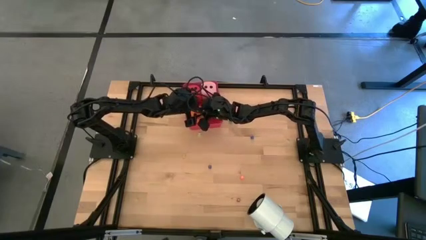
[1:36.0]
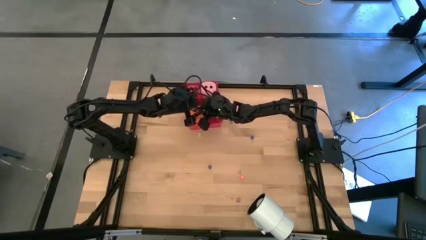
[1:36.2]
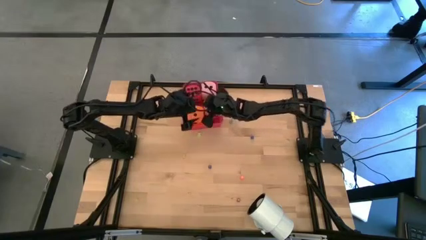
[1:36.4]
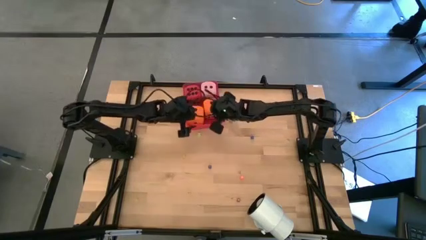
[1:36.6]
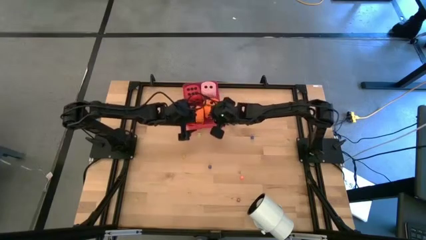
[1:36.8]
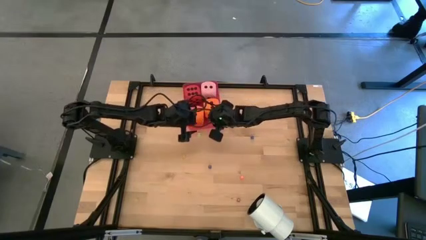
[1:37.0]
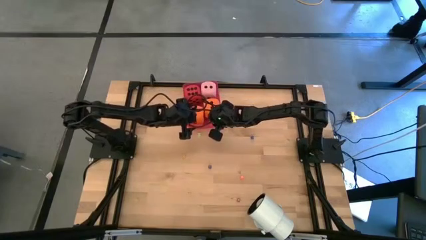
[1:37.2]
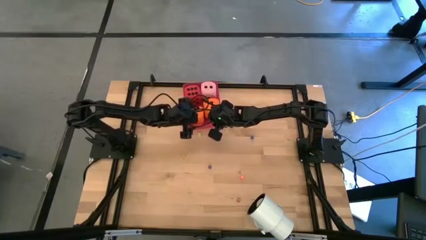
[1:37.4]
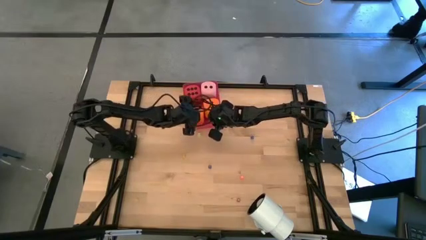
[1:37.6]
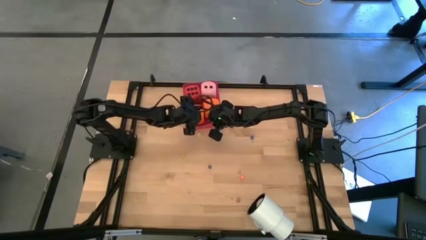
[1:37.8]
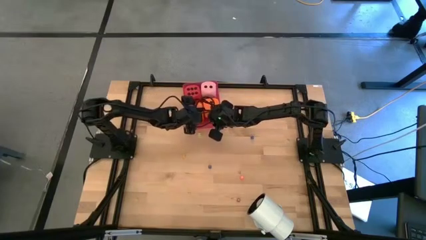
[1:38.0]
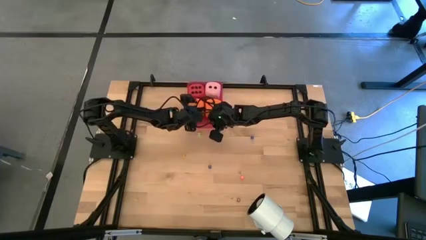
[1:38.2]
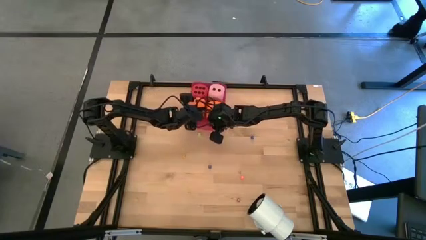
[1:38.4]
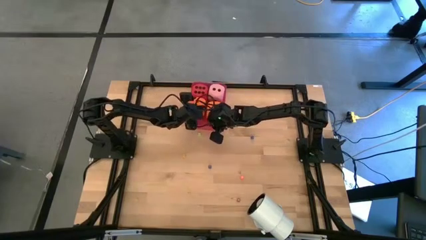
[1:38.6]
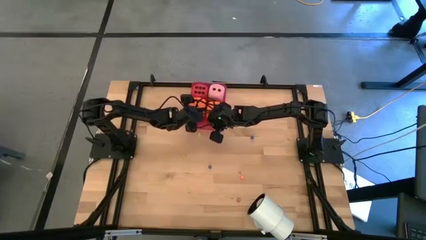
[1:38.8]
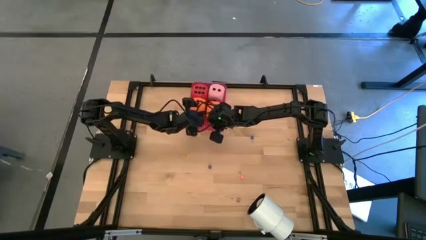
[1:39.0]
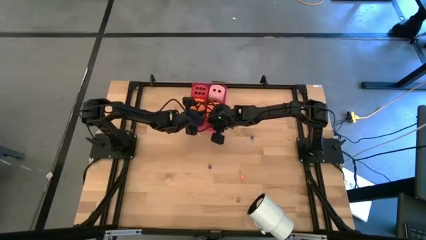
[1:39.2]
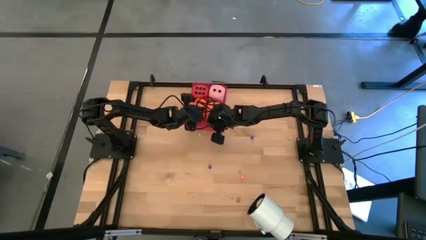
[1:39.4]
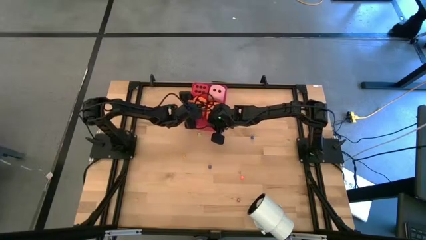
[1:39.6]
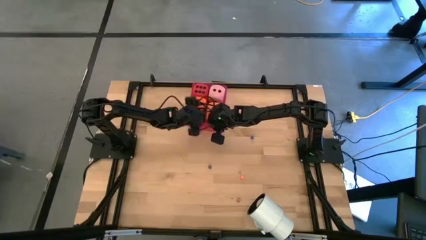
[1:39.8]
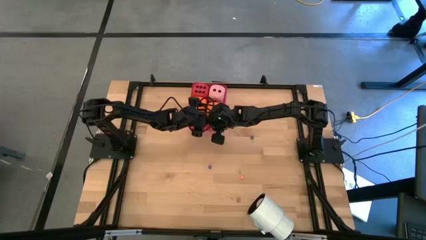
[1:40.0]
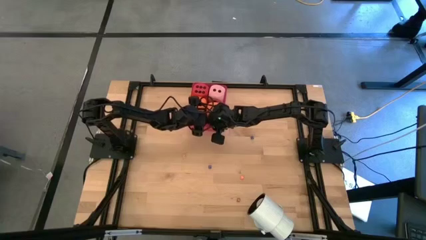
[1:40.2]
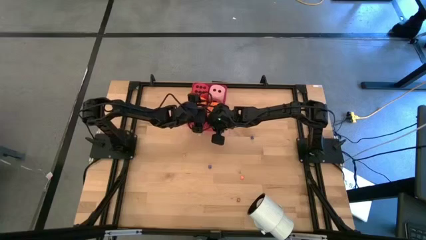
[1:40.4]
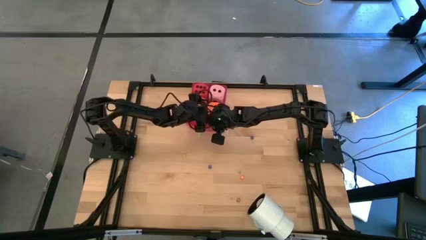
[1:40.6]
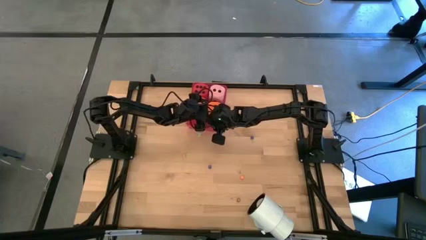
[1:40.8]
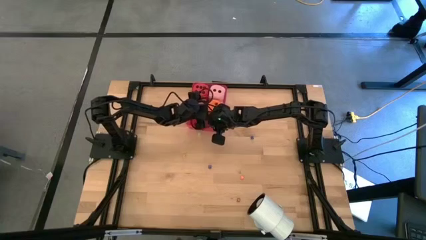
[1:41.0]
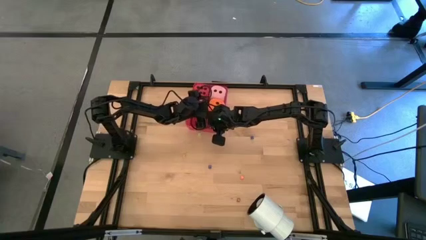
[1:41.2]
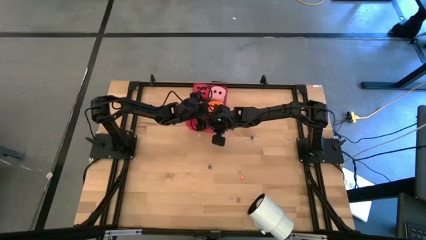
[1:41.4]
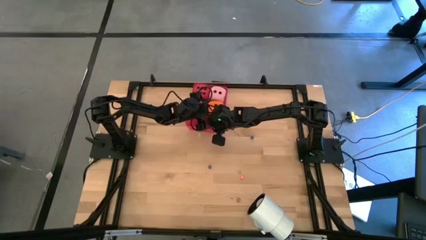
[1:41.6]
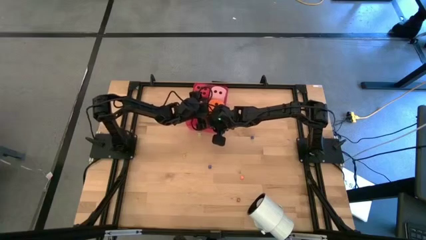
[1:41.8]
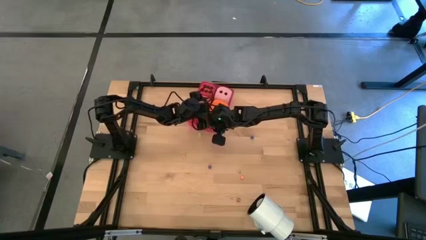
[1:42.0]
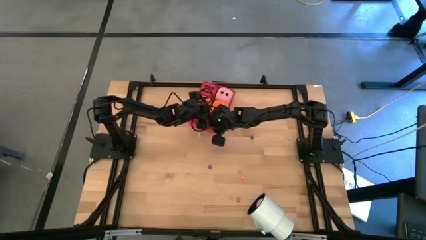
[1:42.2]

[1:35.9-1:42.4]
Task: Pick & Place Dice
Adjust the big orange dice in the red bin

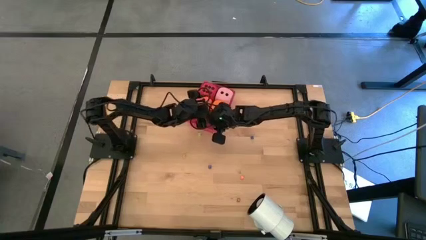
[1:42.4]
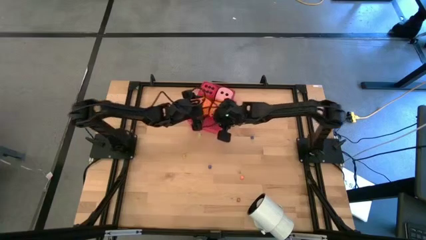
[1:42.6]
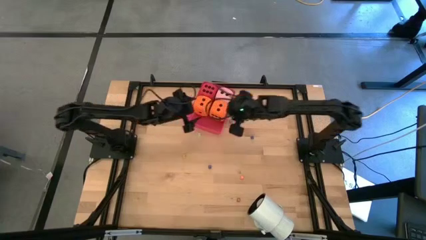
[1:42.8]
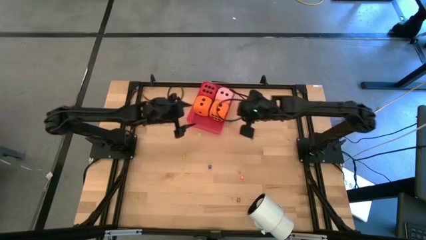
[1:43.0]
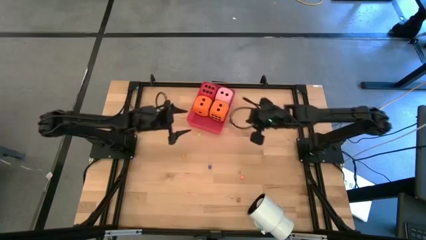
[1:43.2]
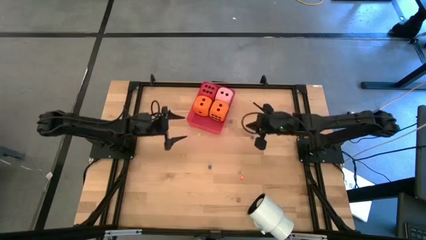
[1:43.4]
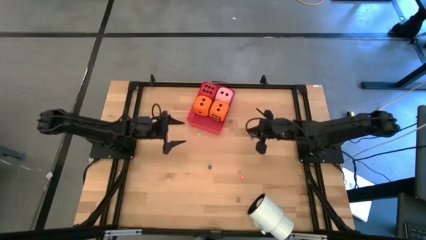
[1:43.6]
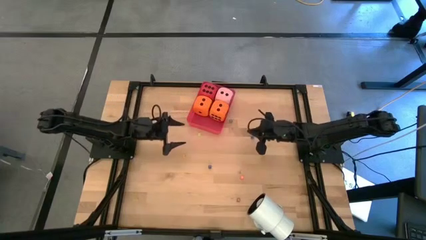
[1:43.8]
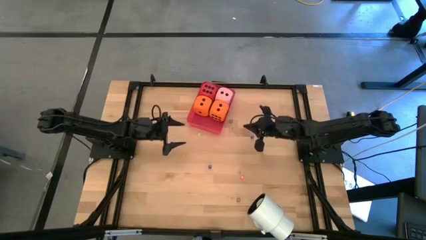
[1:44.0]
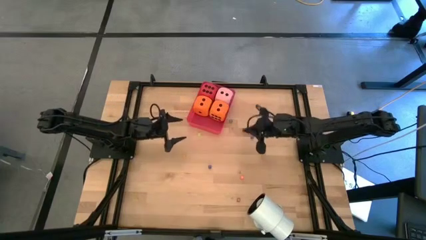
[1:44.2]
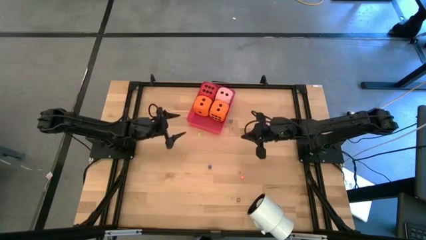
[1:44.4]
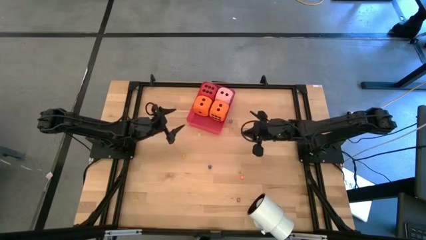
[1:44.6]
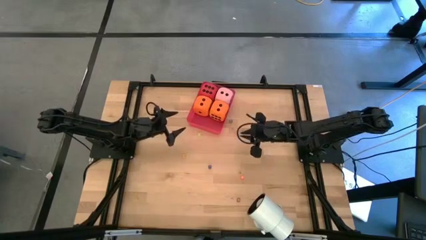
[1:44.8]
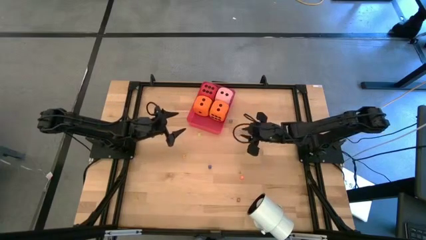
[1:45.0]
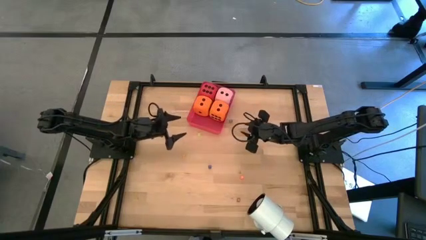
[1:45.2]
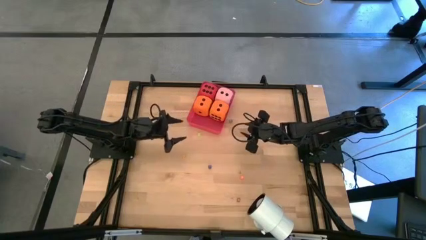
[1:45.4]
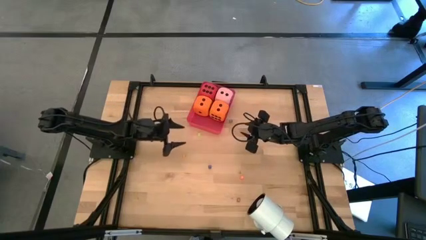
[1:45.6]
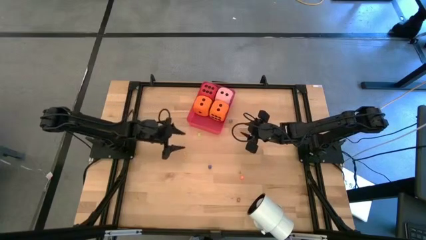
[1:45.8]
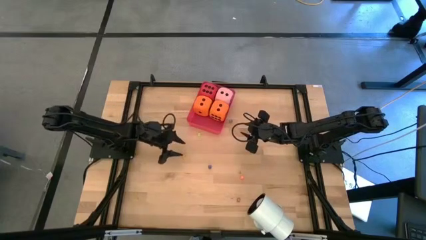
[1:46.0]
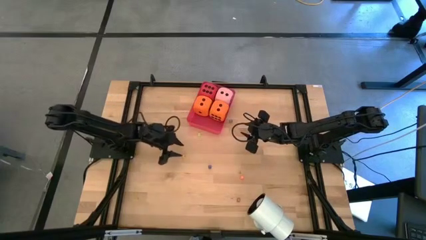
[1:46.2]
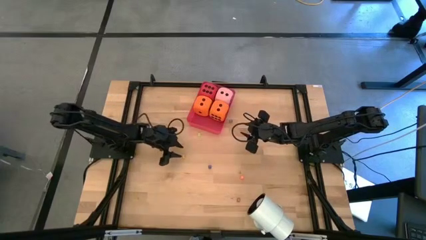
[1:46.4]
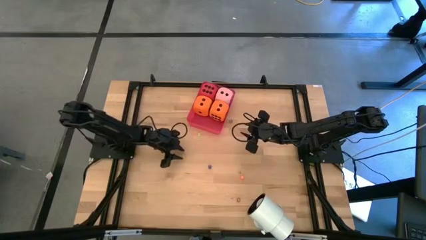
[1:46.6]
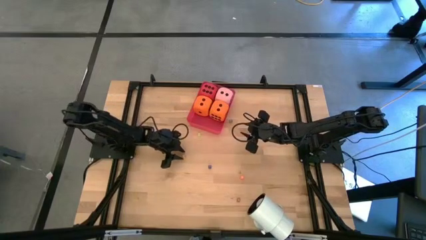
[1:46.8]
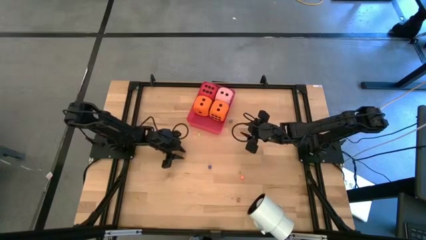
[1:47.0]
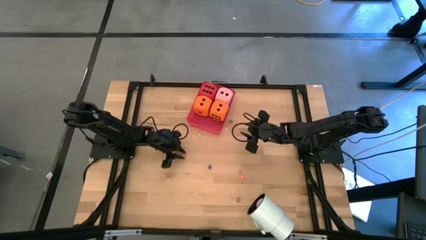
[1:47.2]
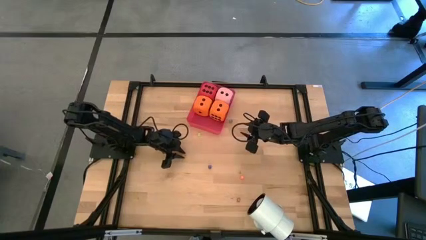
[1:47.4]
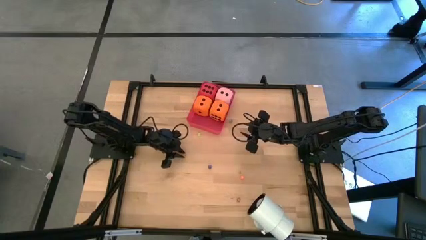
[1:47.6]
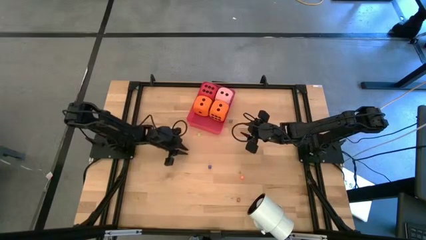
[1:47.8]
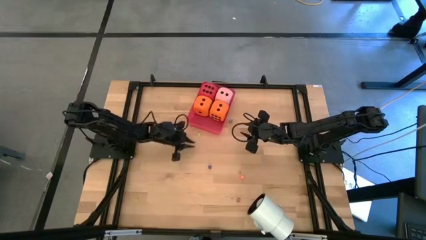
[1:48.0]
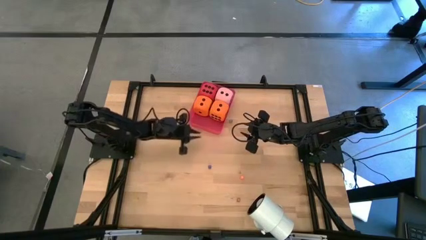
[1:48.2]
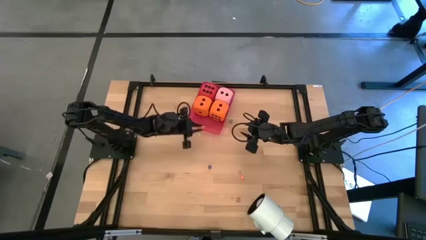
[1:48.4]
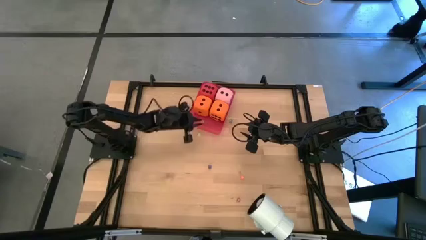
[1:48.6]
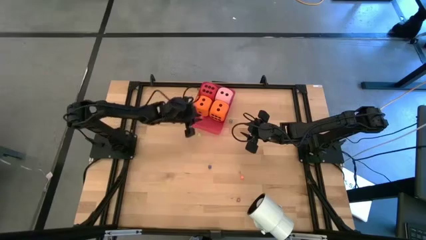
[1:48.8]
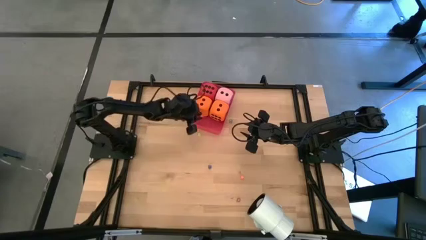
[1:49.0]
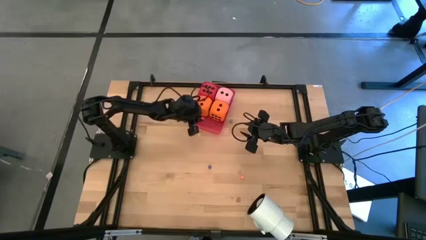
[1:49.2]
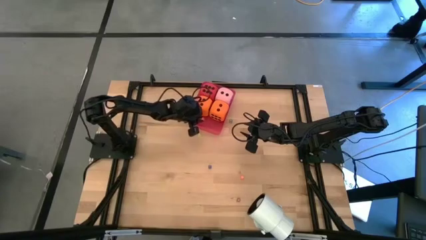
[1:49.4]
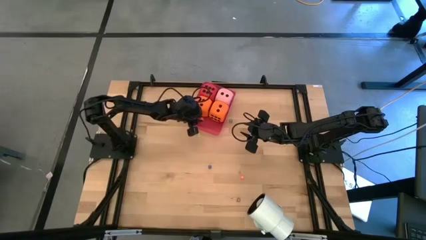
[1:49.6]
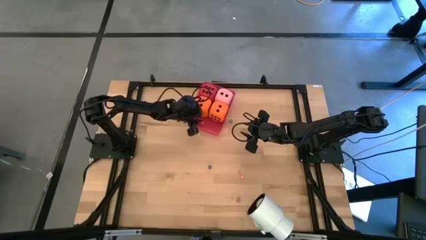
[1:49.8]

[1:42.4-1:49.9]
Put the small yellow dice into the red bin

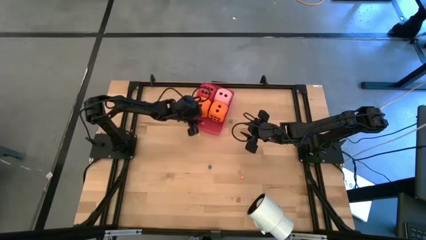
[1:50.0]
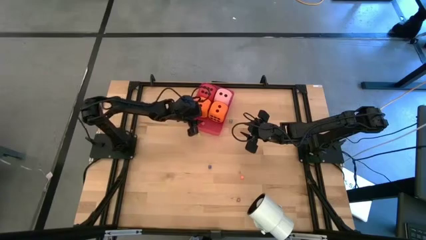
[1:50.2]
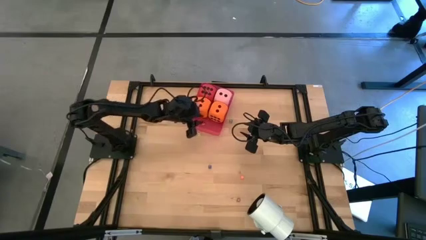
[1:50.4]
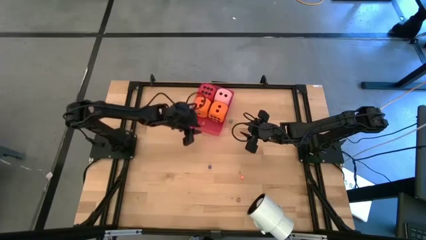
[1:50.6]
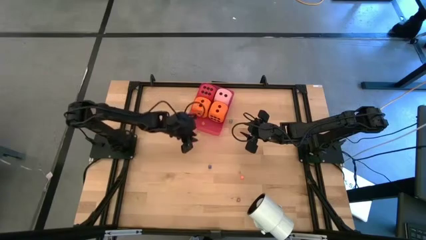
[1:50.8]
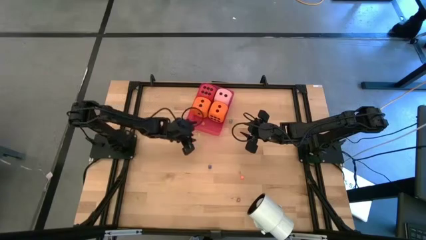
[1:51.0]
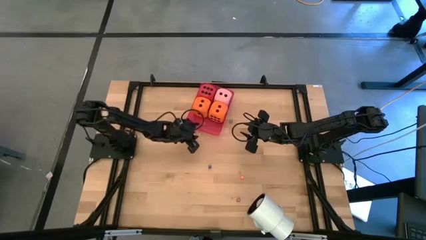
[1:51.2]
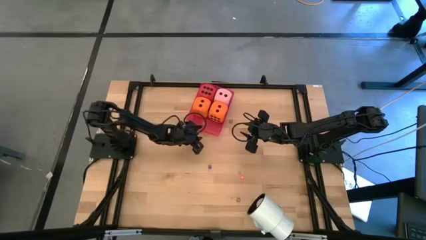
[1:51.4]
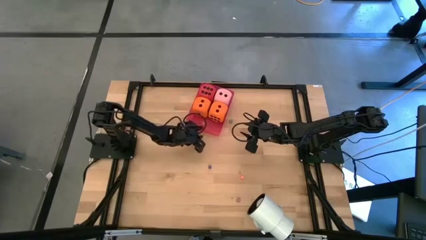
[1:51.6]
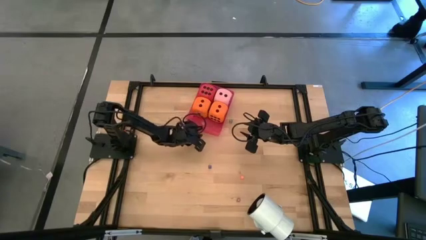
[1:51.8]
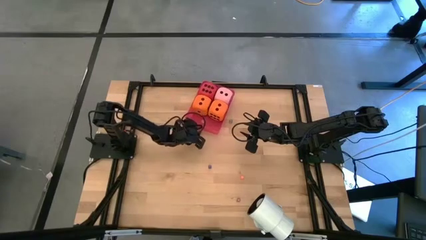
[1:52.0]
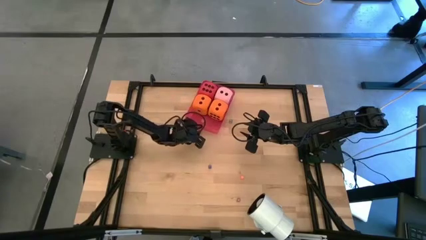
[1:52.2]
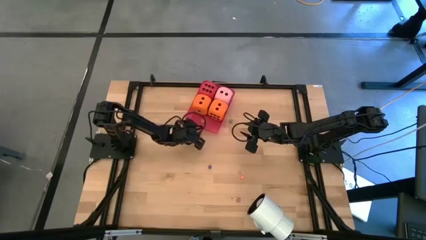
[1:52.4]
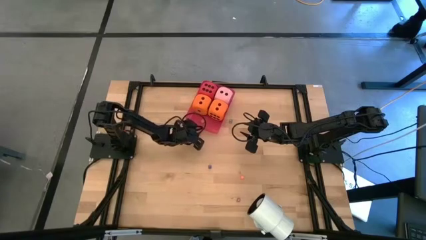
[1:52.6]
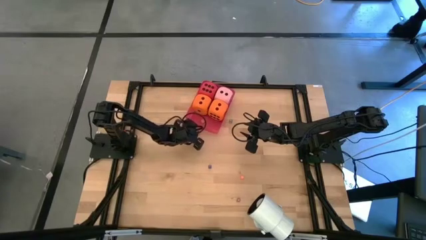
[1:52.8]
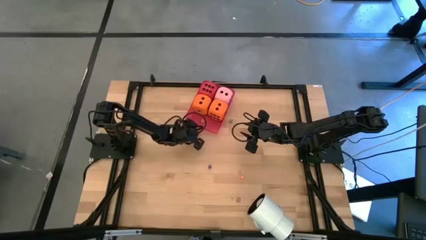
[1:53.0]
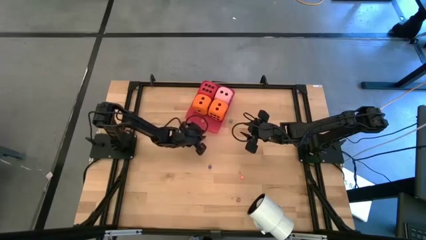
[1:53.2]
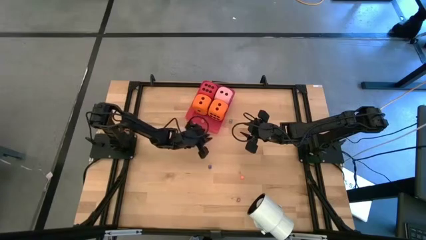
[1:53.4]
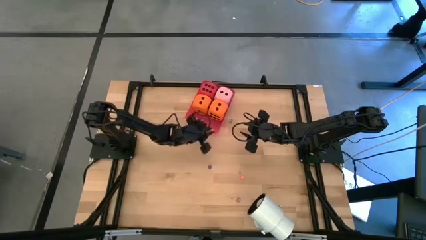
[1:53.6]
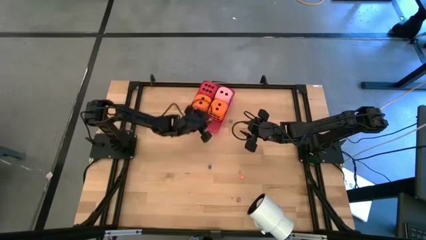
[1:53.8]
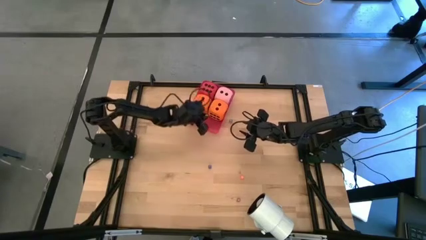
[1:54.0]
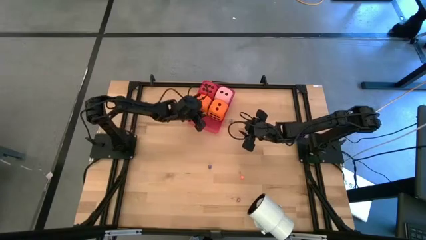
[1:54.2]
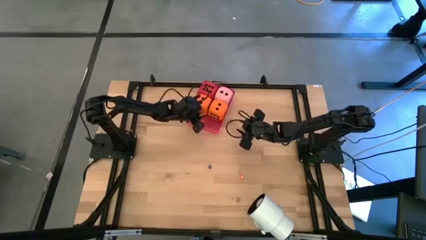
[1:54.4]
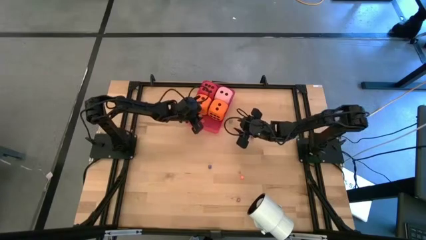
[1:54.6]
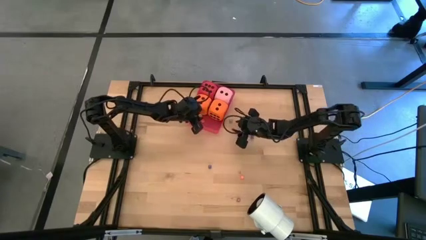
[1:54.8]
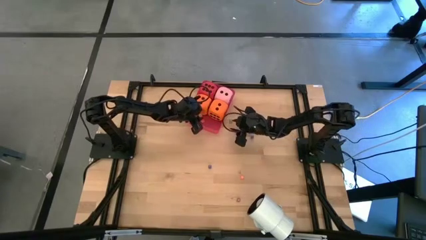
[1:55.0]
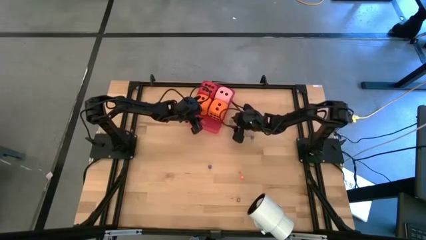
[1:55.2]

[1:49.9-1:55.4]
Put the small light green dice into the red bin
